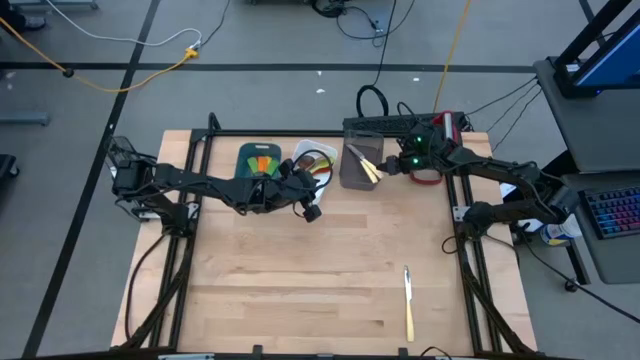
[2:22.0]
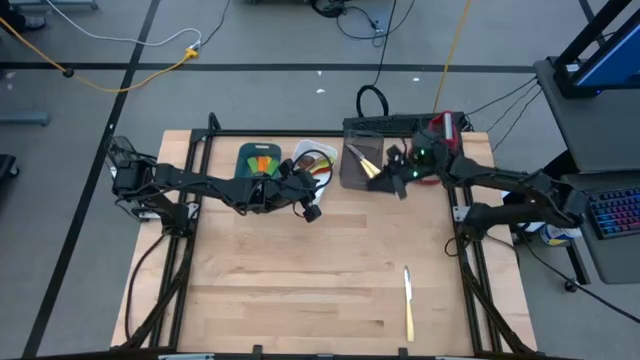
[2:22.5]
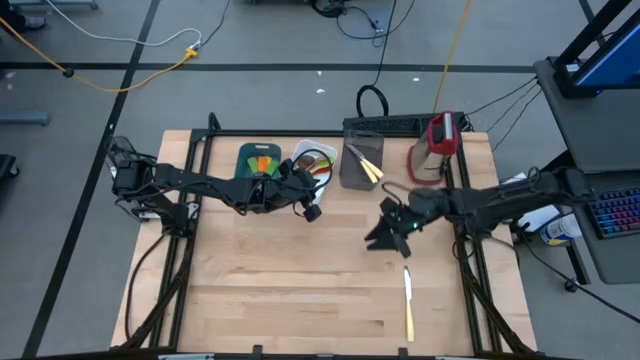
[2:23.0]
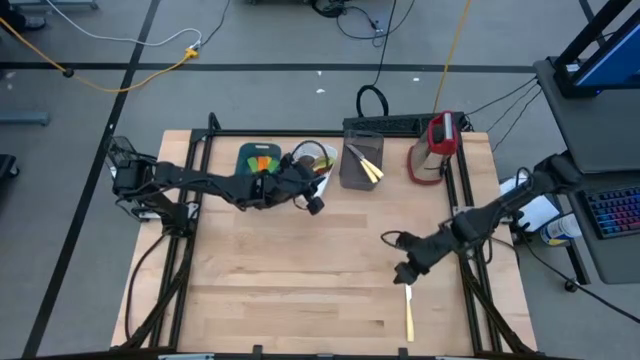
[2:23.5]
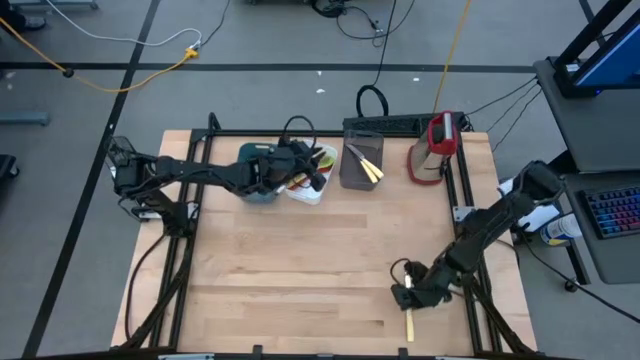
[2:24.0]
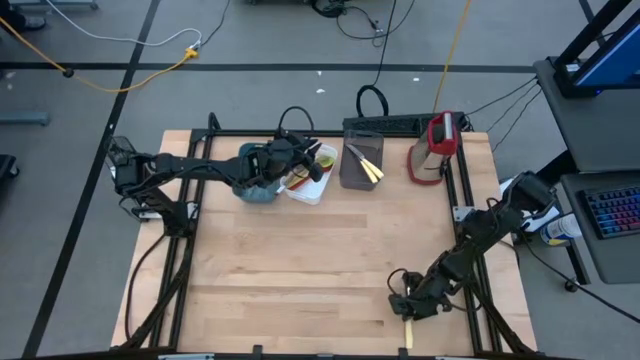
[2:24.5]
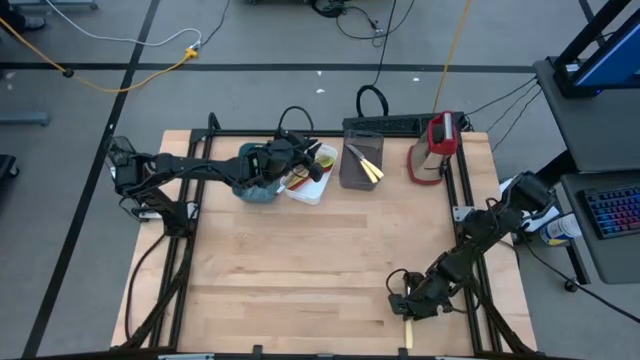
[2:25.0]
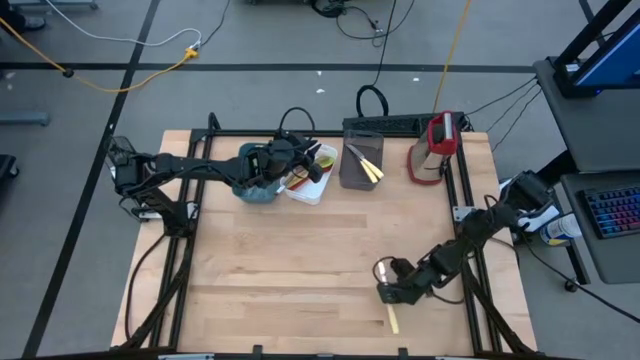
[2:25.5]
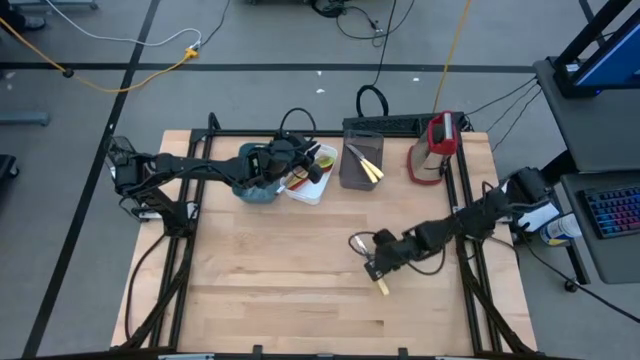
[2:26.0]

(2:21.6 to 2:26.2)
Task: Pick & Place Kitchen Items
Put the yellow table knife into the black bin

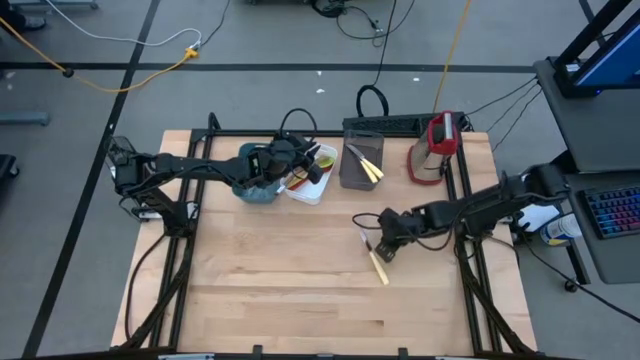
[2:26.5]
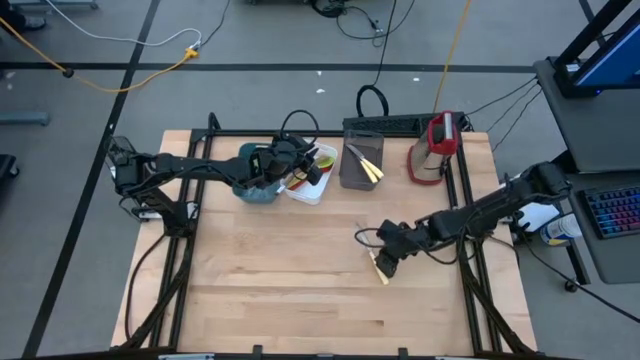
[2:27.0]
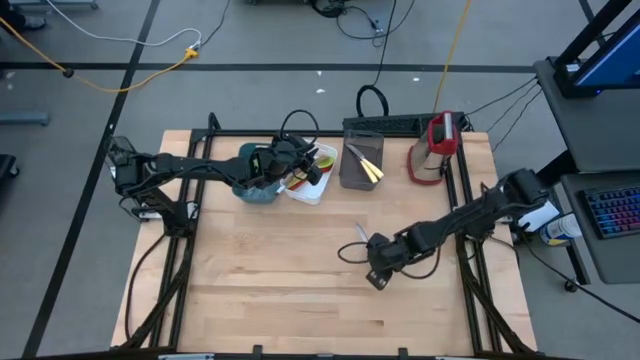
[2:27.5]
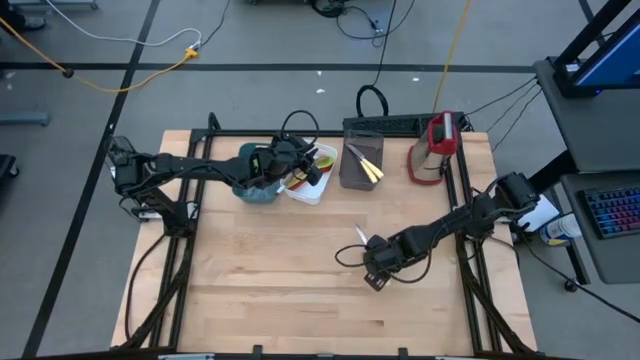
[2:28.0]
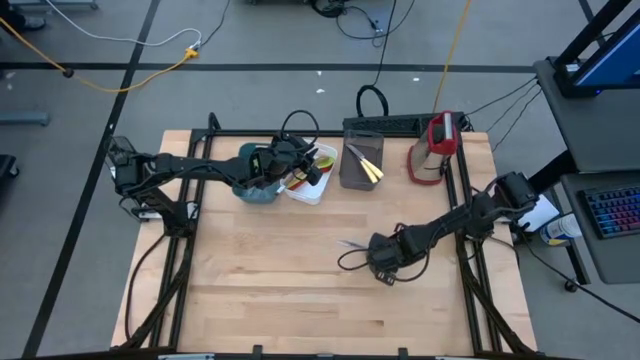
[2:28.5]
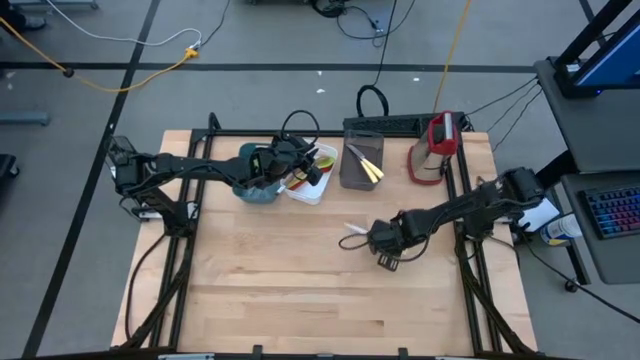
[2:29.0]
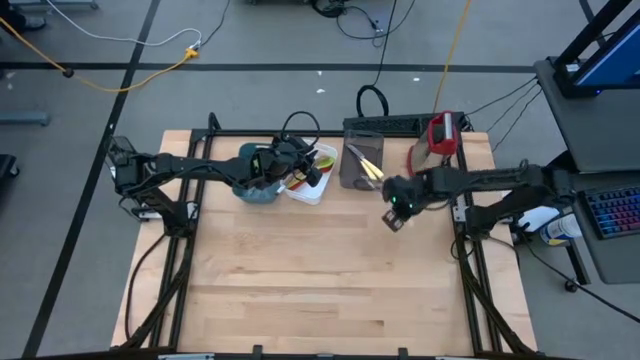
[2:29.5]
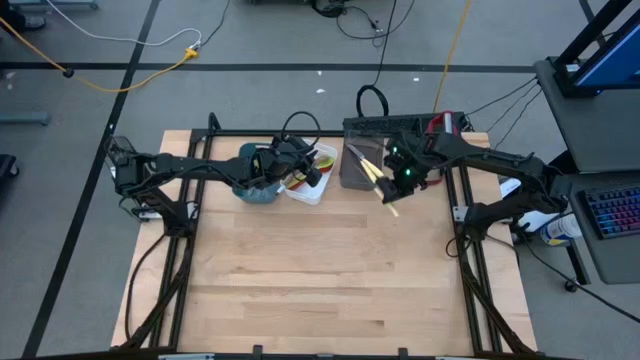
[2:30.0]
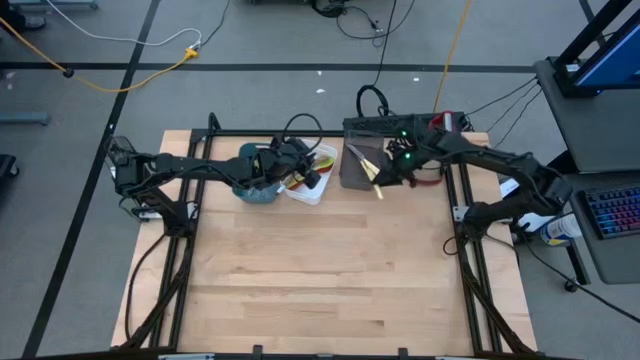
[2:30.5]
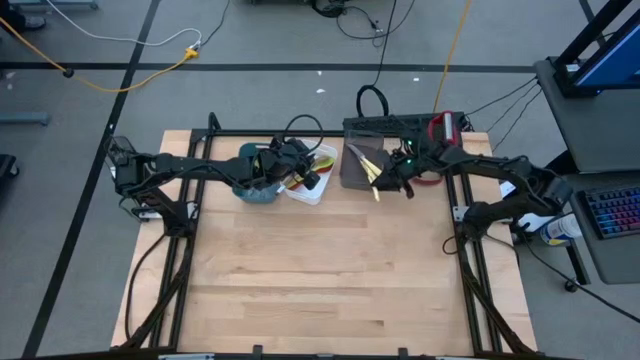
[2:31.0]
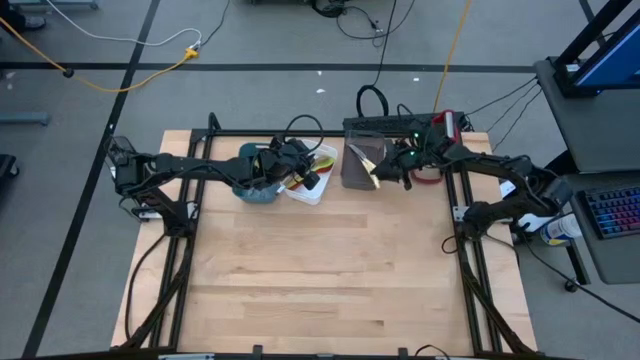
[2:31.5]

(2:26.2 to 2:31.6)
Put the yellow table knife into the black bin

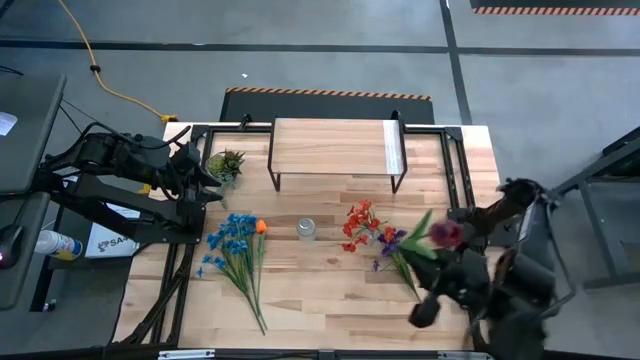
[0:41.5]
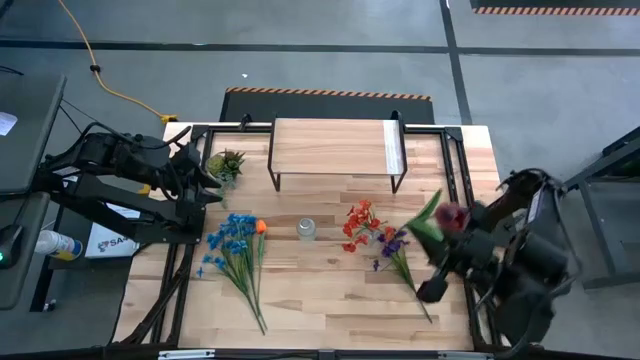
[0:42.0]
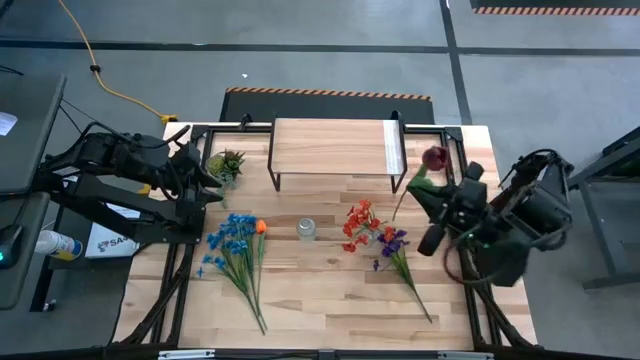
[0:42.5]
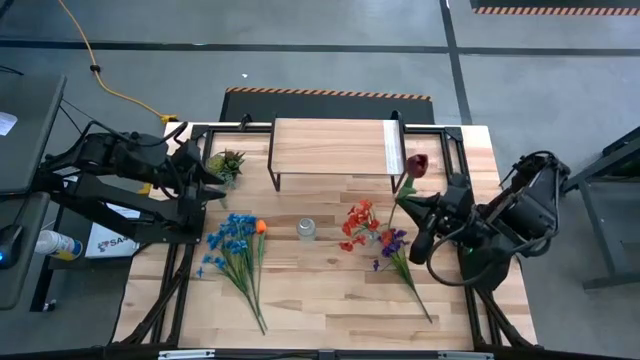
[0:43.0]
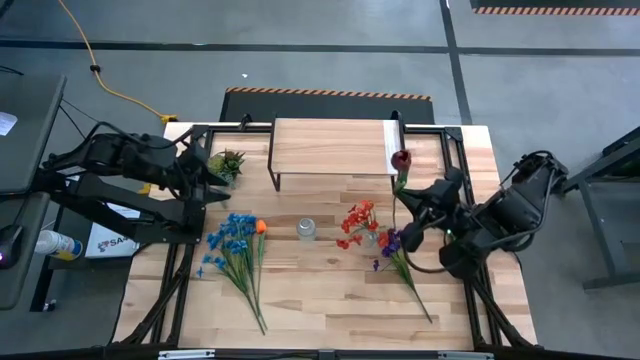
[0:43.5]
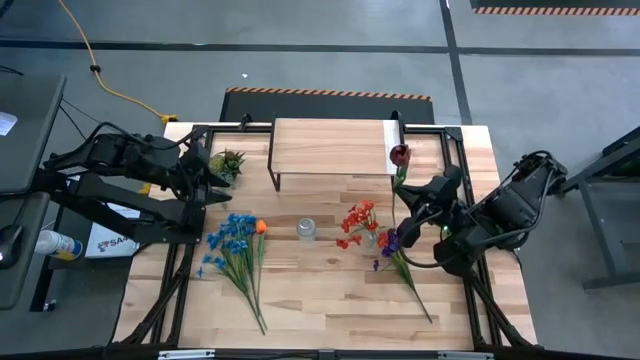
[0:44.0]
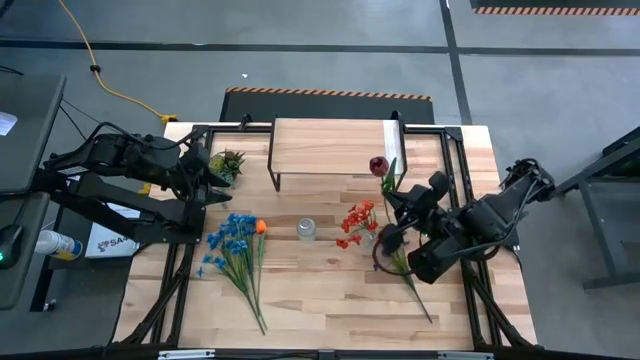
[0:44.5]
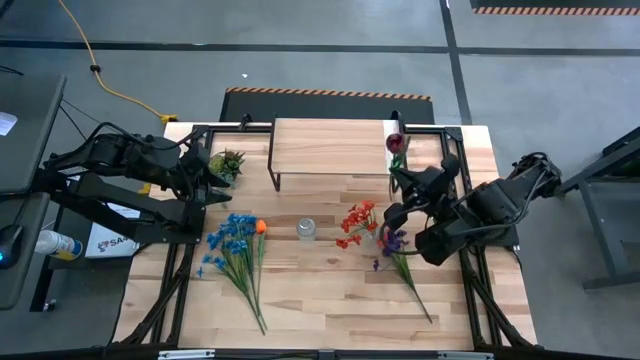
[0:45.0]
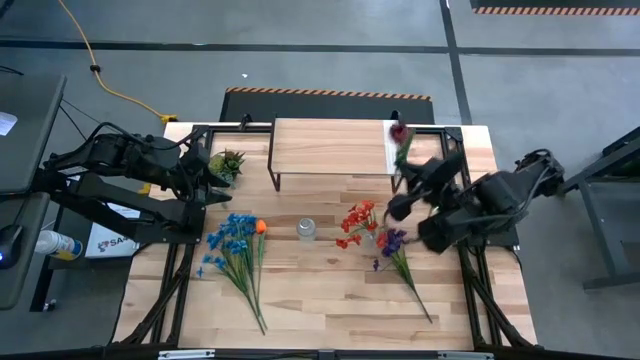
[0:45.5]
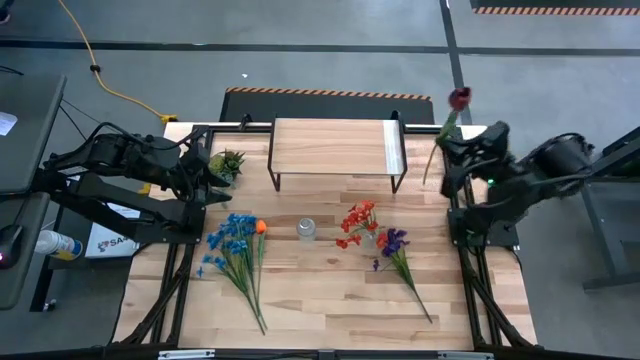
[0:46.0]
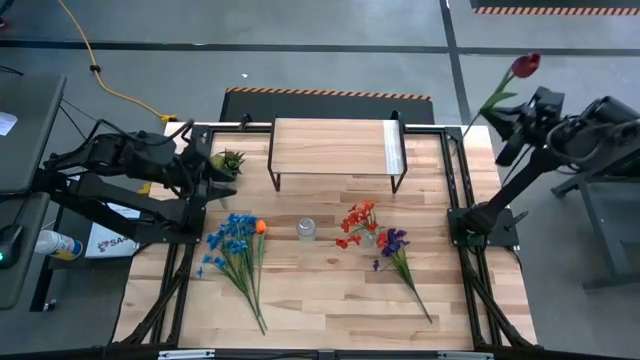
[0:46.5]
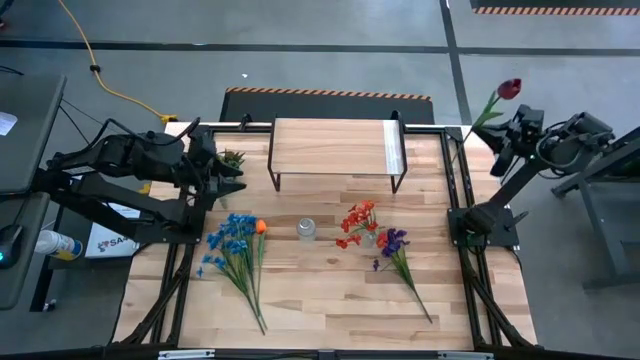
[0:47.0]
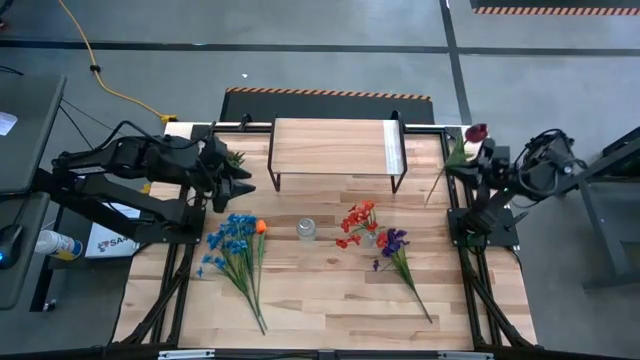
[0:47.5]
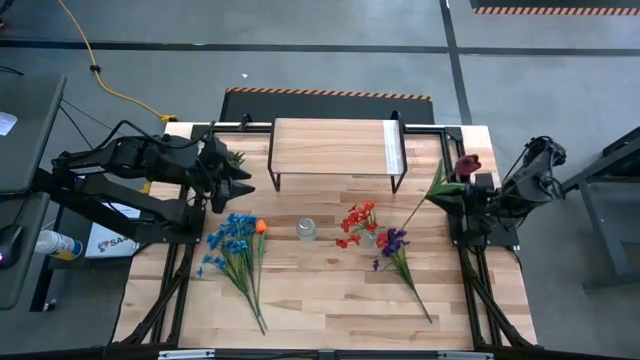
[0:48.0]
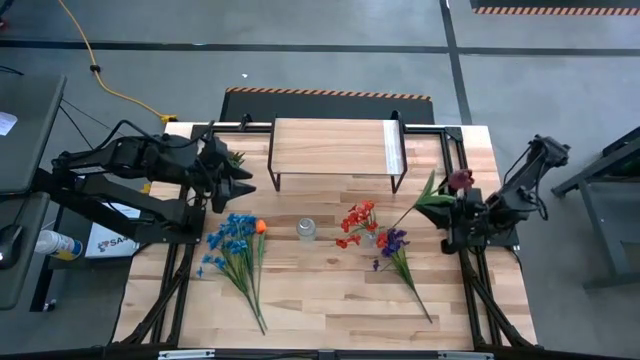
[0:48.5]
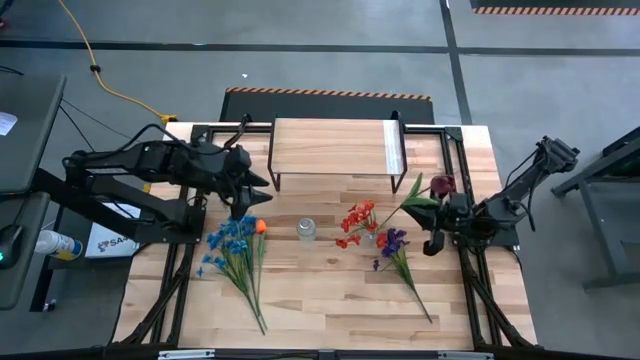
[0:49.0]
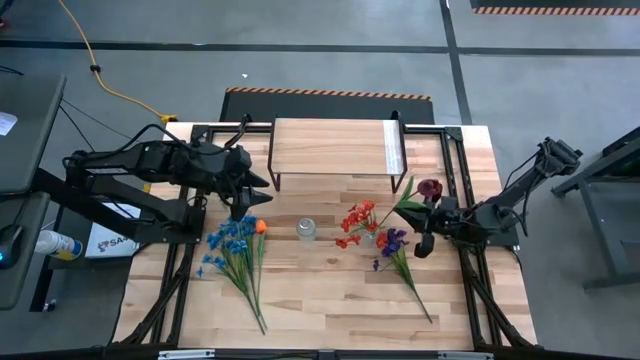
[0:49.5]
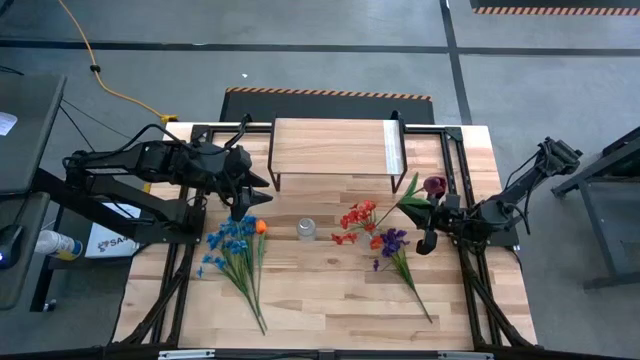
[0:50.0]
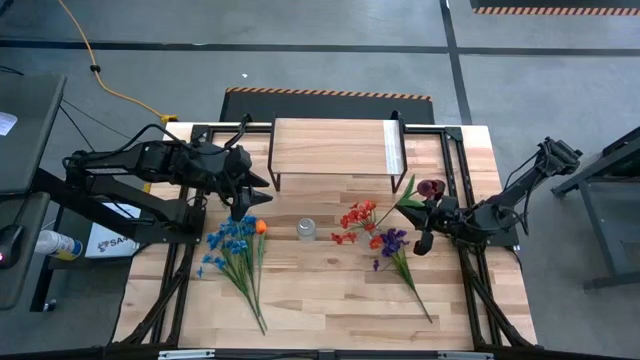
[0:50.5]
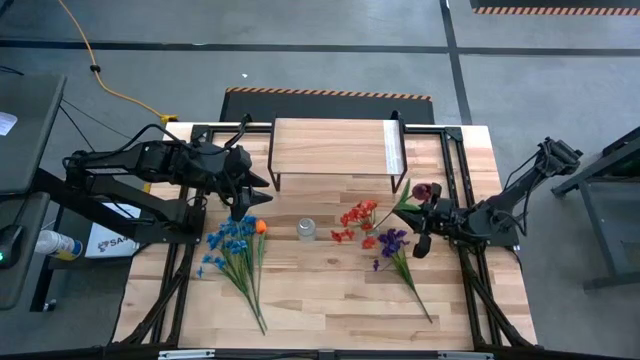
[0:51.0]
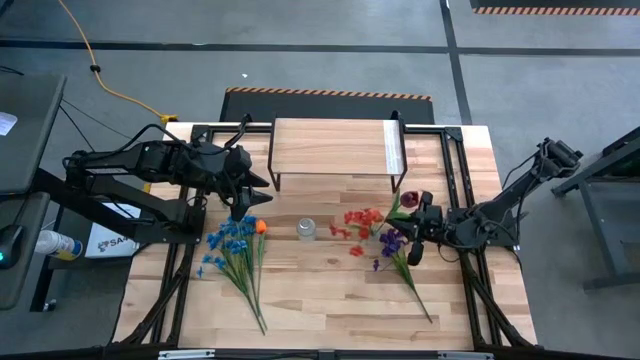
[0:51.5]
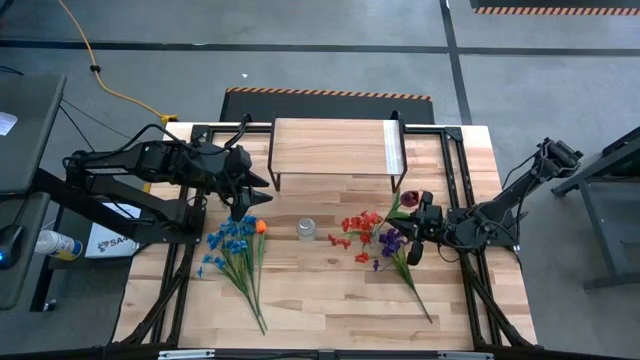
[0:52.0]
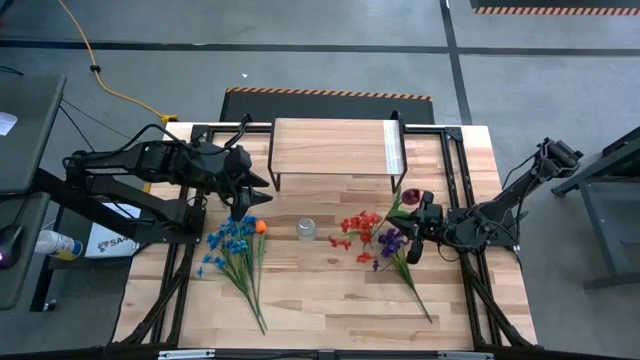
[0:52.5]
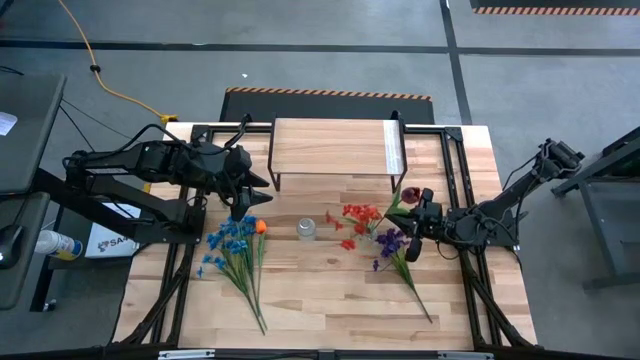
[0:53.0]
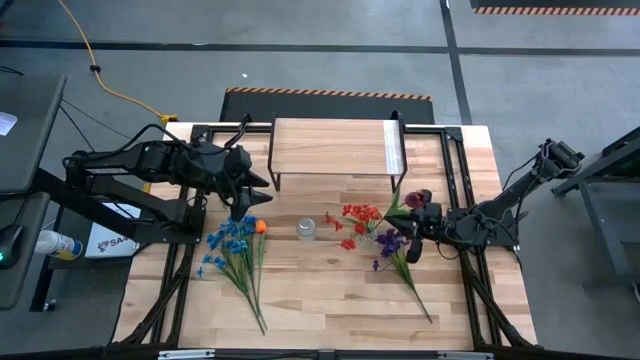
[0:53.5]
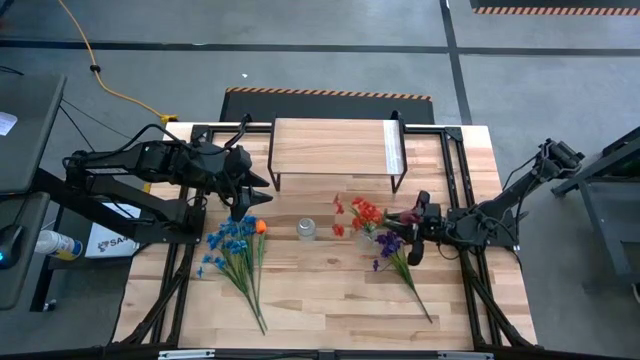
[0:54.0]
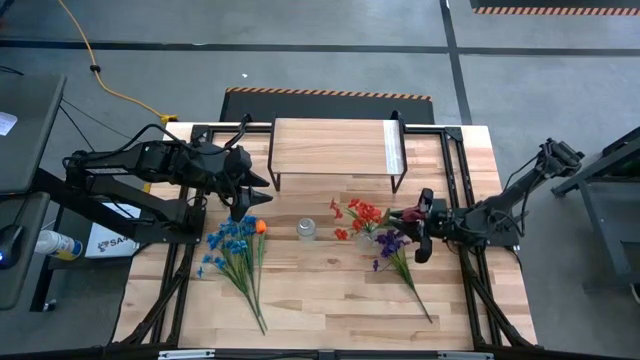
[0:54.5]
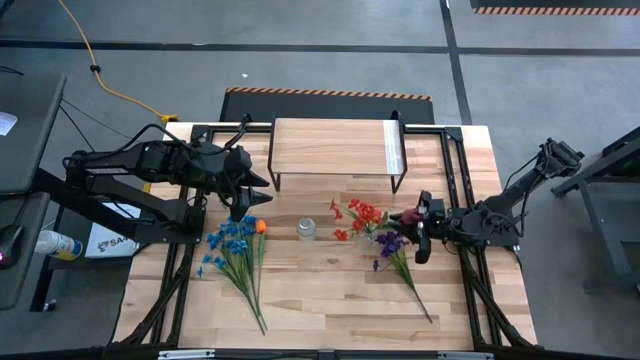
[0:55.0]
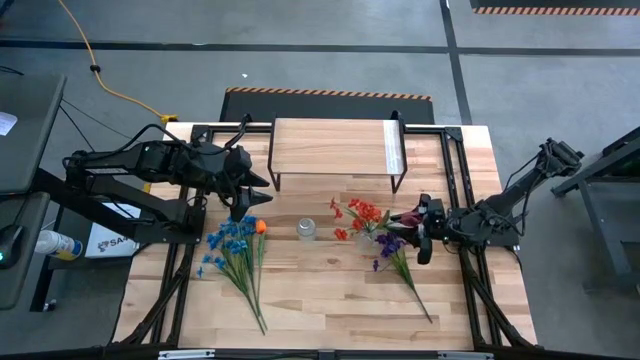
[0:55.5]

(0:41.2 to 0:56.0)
Task: Pick and place flowers into a vace then onto a shelf
Put the dark red flower into the right transparent flower vase
